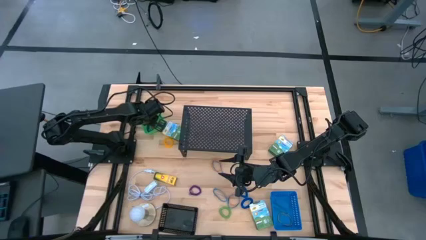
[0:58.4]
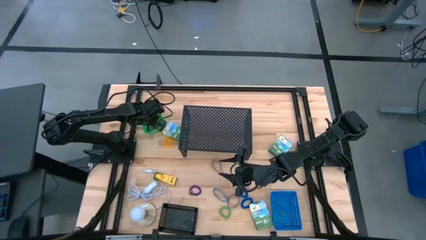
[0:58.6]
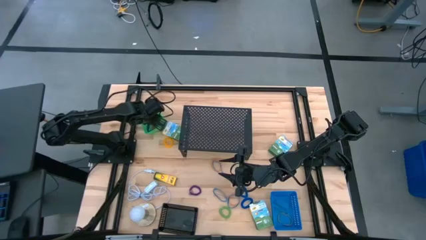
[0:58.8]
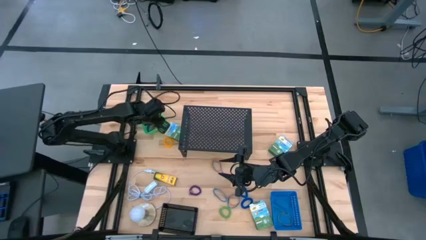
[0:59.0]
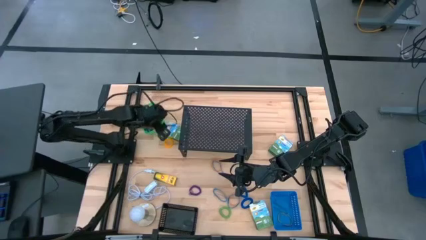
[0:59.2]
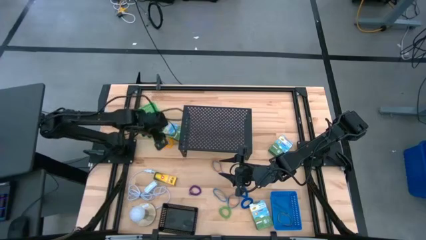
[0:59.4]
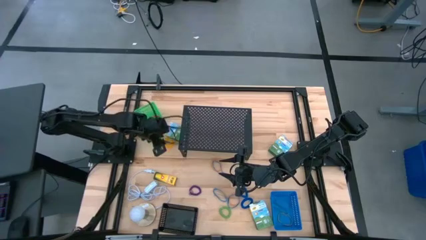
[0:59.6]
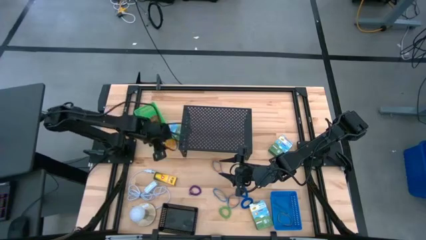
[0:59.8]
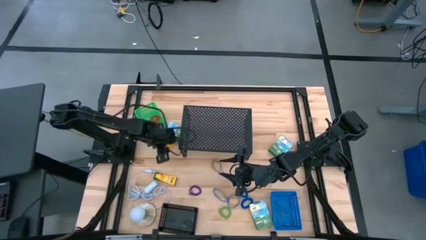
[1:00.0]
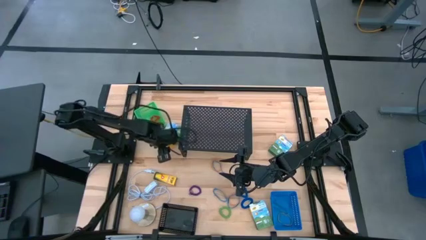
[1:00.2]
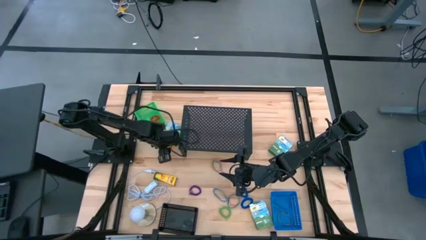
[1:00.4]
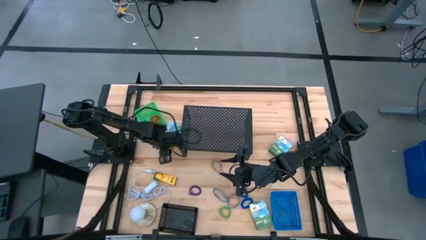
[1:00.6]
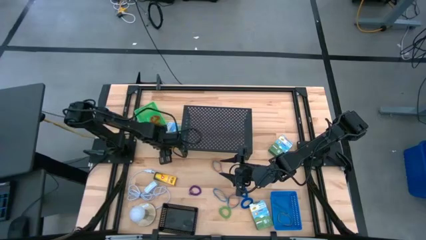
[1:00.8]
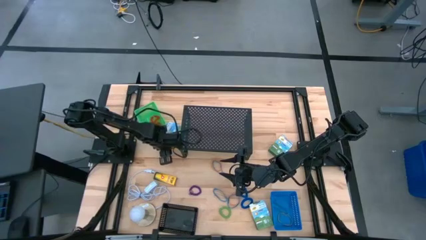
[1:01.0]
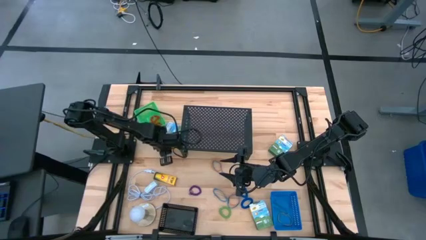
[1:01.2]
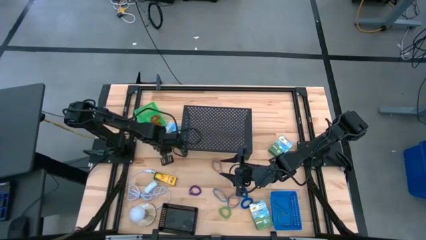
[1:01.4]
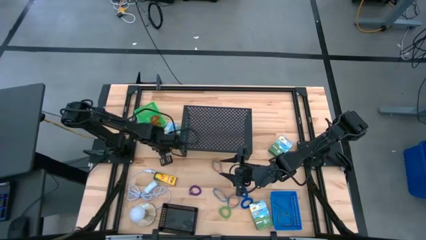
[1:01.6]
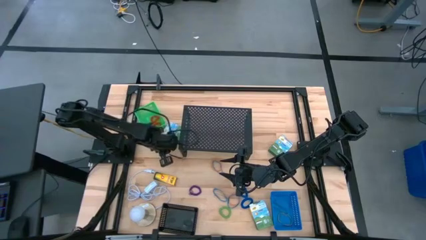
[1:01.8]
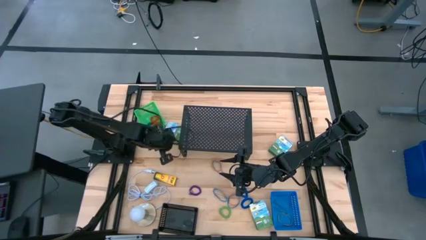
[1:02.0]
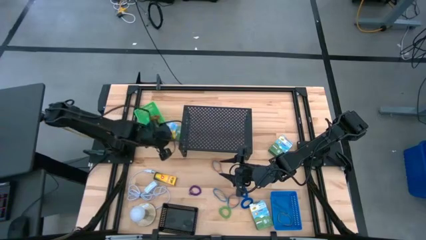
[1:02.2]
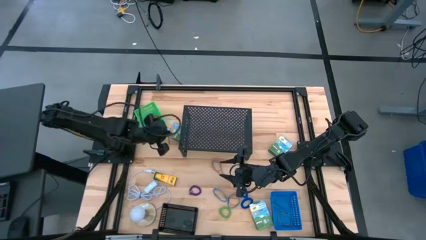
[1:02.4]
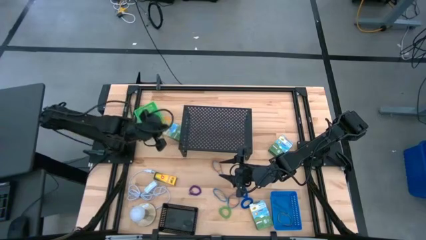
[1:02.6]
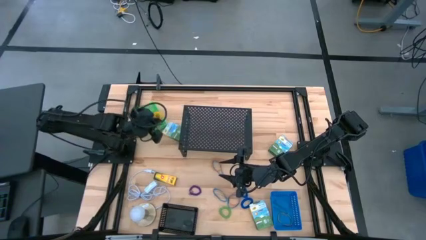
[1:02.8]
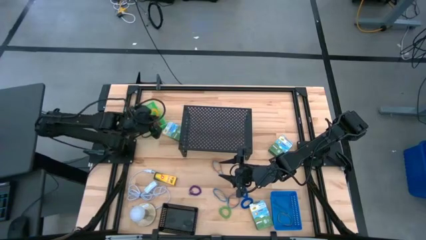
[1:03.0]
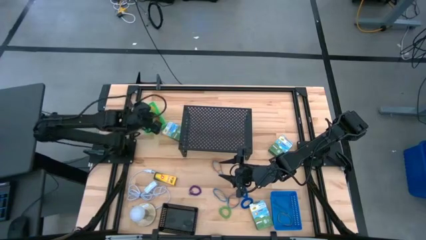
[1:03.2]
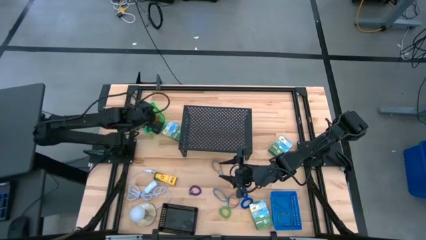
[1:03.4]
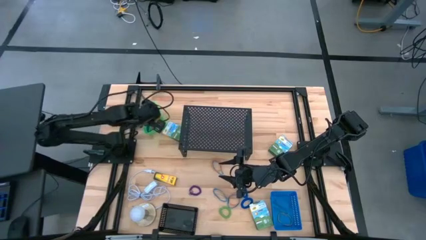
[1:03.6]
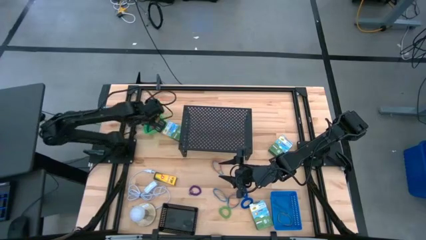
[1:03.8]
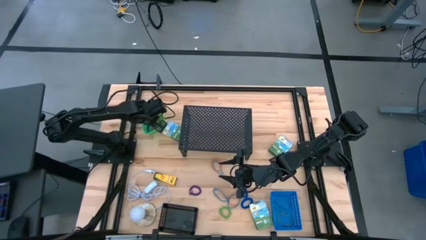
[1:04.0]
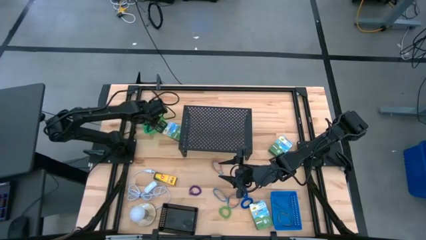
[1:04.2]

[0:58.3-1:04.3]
Task: Pick & Place Office Desk Supplies
Put the yellow spring keychain into the green bin

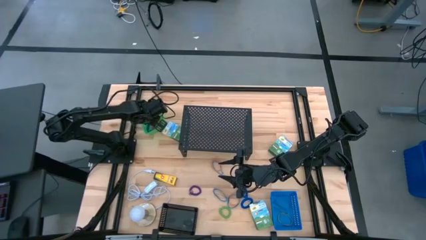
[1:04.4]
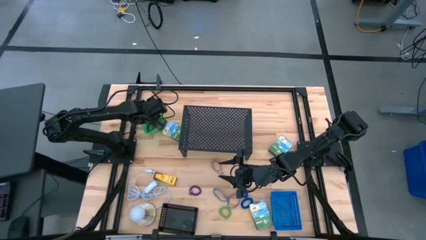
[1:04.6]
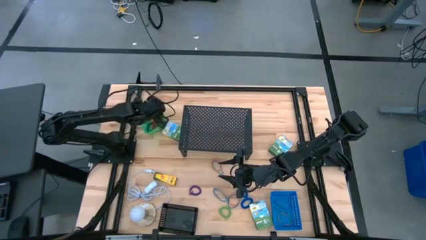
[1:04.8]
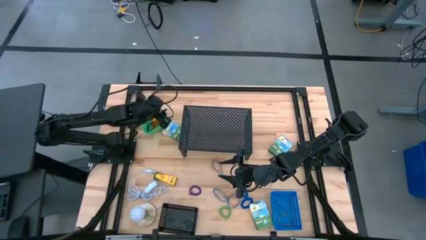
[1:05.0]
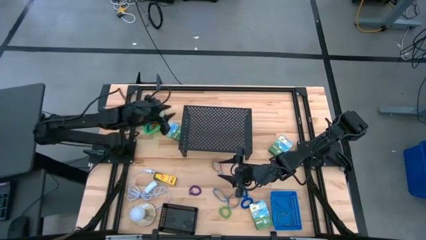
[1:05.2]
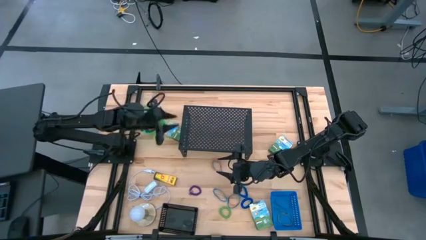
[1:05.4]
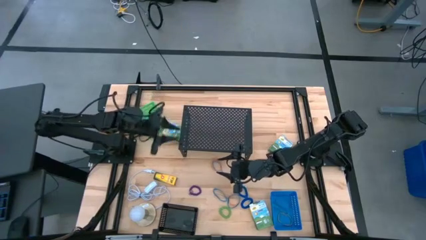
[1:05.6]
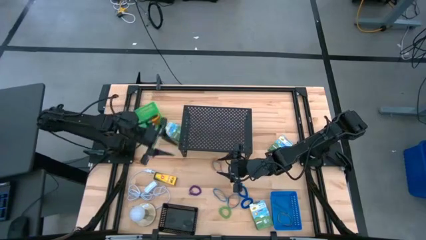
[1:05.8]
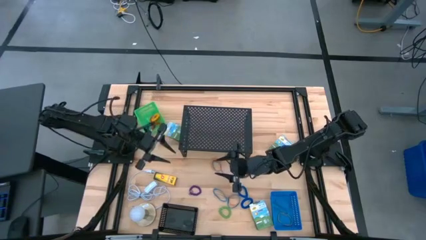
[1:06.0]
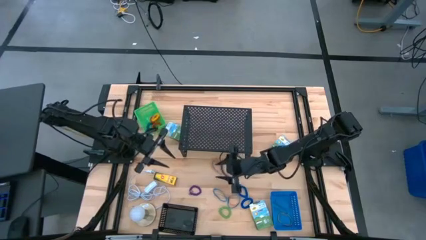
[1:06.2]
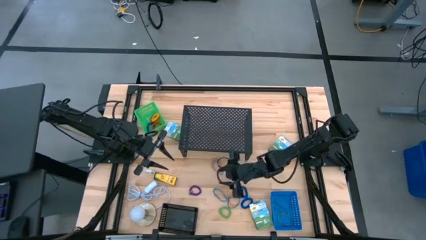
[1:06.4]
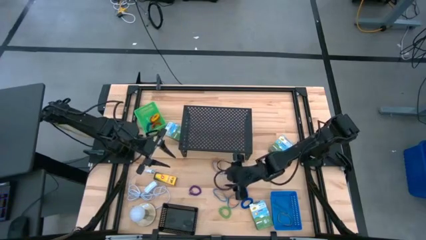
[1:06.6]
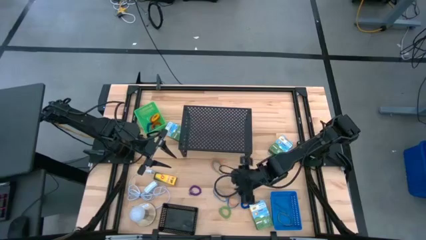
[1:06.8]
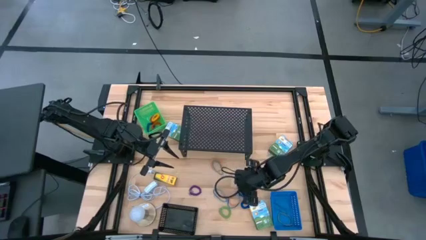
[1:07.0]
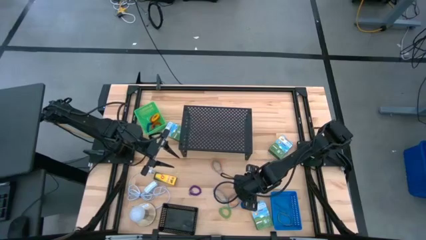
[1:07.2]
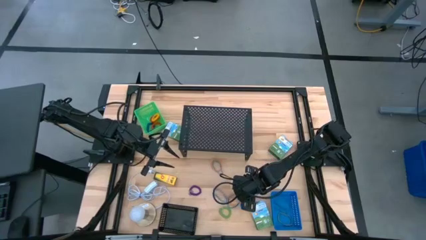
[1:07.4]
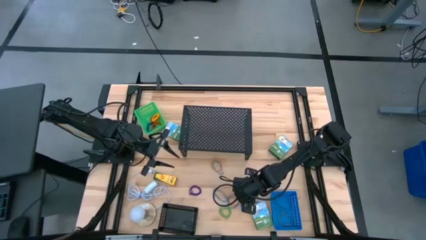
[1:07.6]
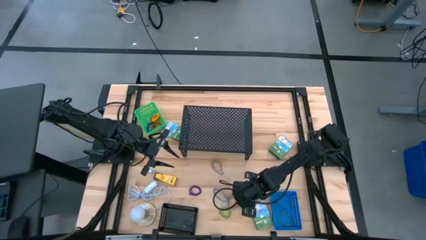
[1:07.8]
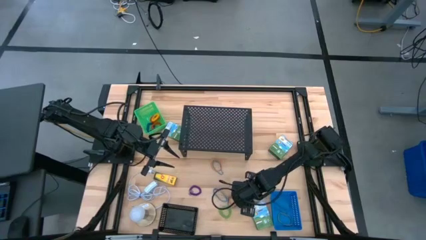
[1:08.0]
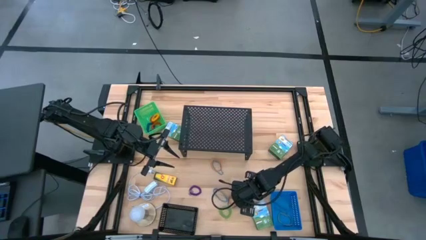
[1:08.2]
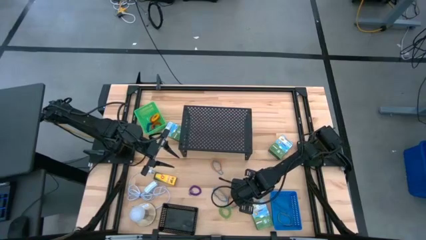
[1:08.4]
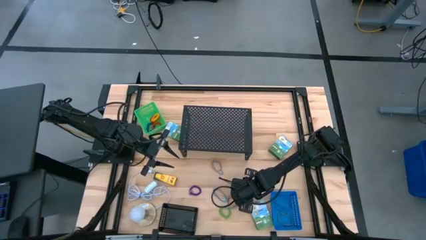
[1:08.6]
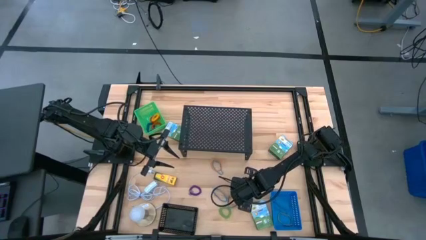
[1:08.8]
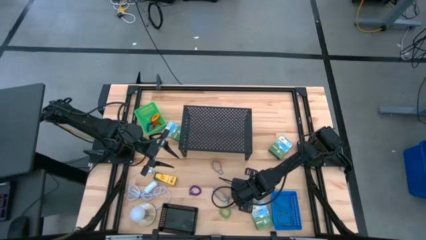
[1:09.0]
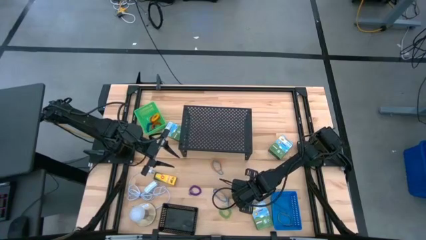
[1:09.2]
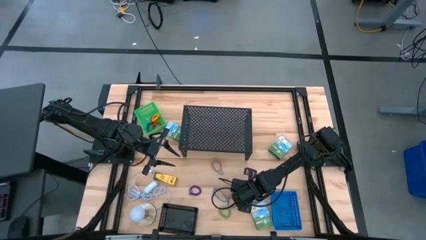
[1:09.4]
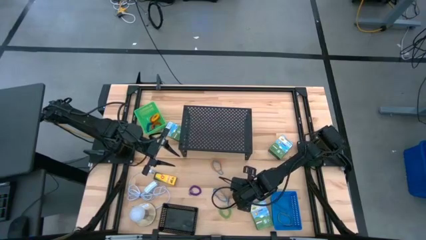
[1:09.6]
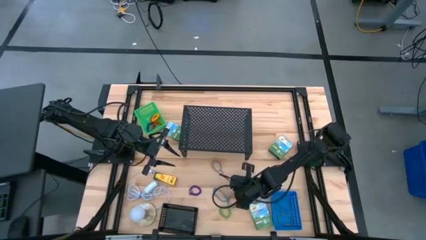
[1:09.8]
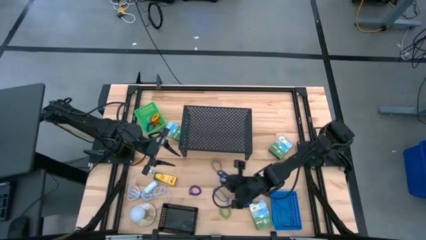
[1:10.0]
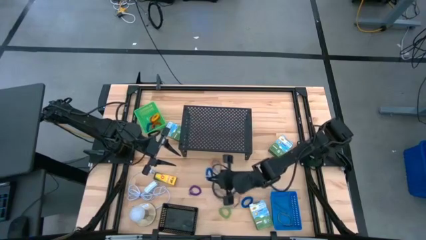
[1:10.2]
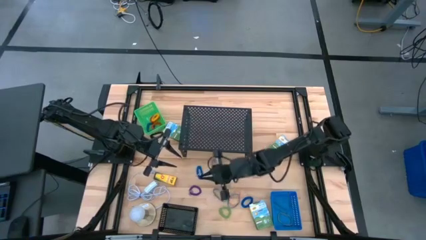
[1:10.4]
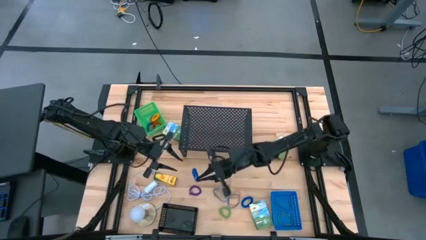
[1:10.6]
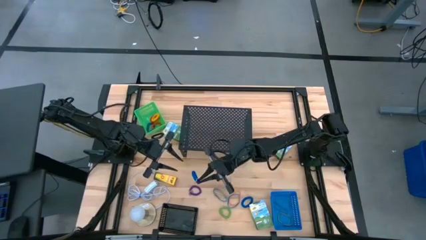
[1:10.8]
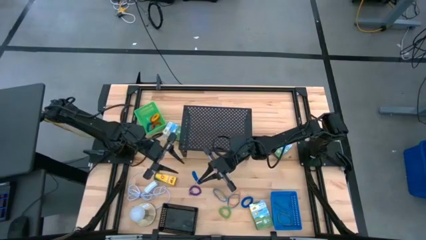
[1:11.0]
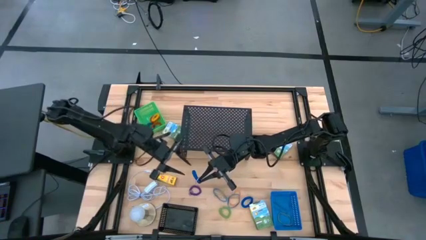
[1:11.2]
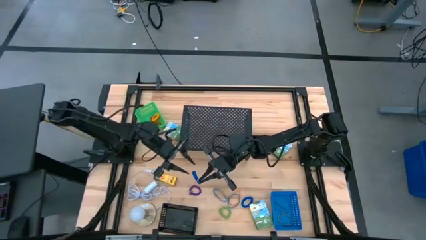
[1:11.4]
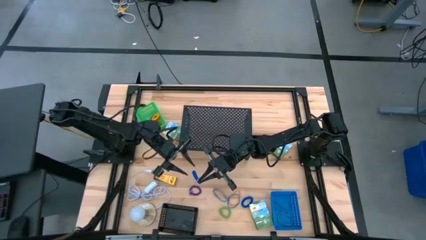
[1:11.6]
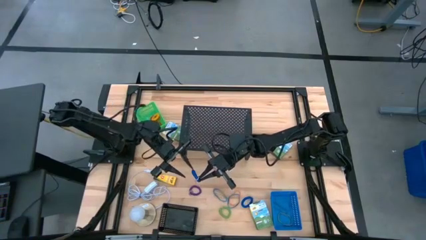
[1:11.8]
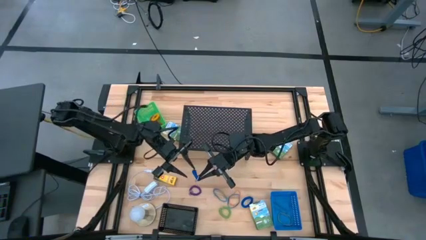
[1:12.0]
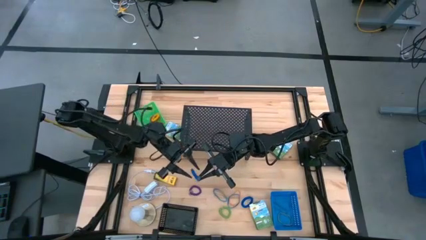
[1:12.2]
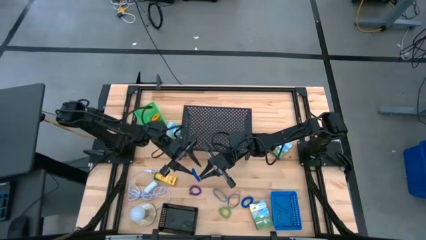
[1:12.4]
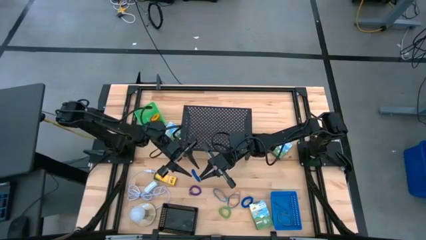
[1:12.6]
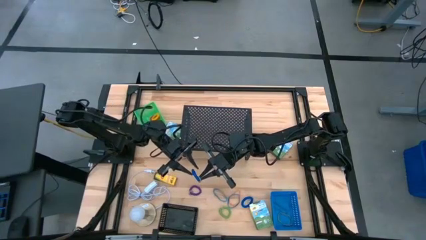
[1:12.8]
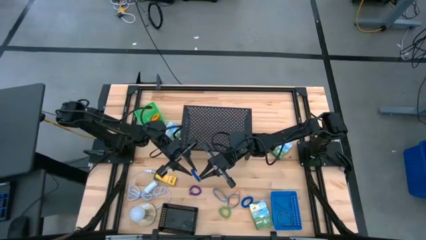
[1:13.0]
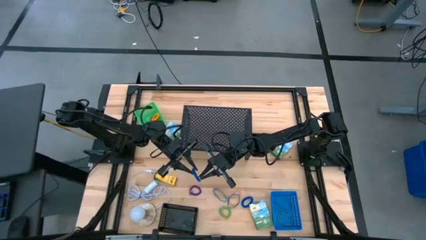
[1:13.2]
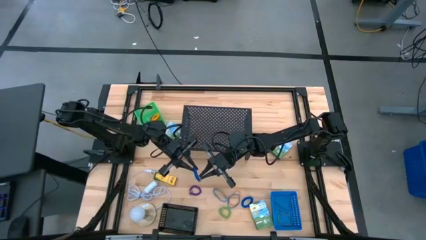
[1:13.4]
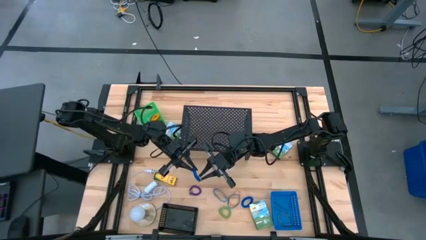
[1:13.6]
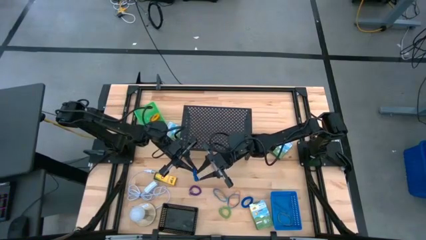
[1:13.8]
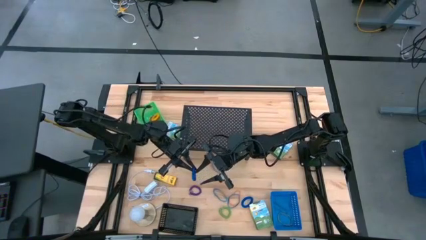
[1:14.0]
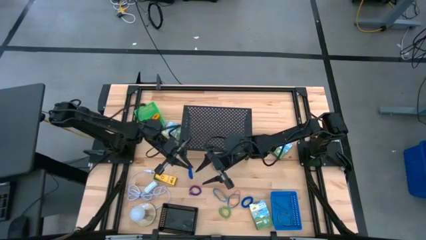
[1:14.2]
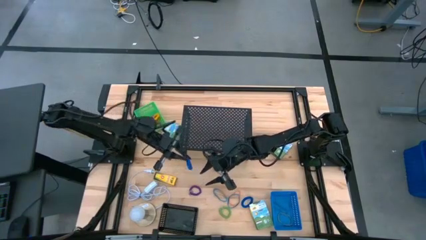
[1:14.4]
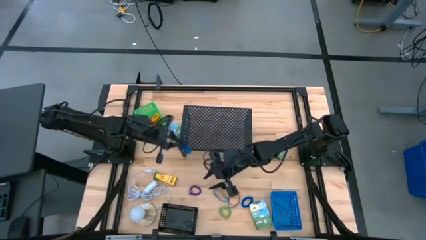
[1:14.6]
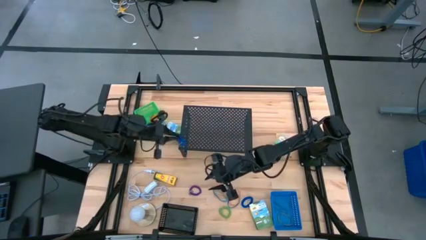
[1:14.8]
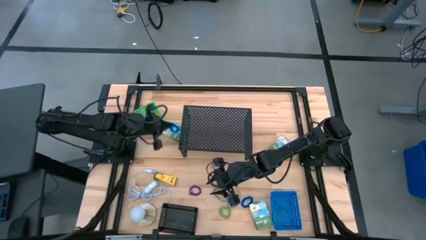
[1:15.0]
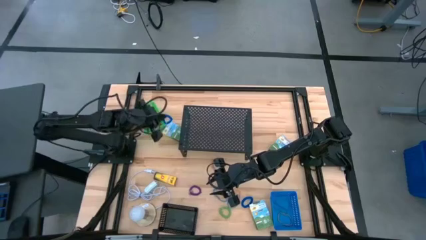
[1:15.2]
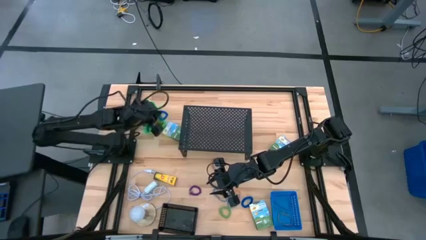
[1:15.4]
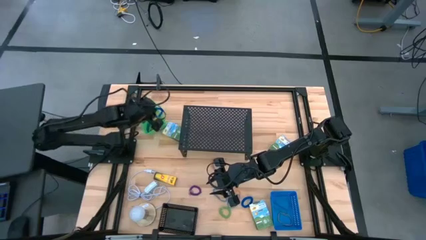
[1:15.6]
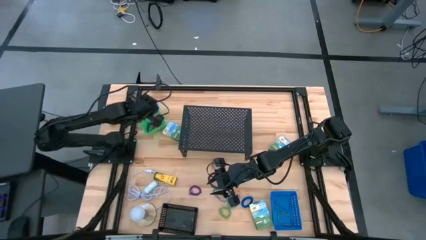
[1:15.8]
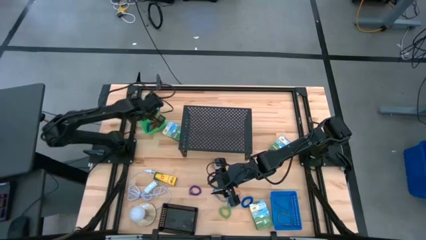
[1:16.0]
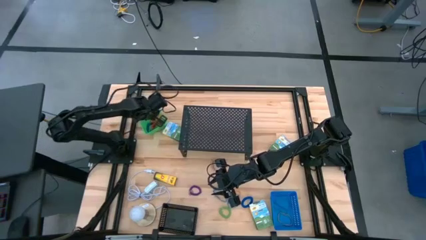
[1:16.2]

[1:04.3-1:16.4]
Put the blue spring keychain into the green bin
